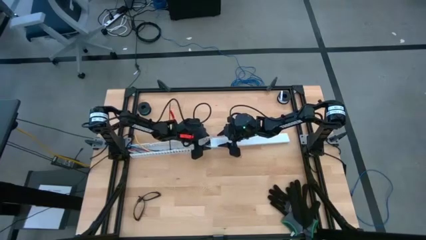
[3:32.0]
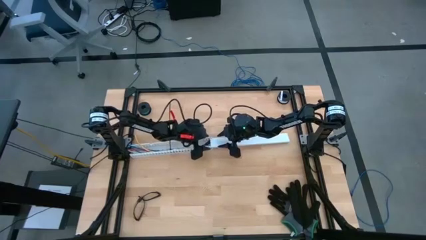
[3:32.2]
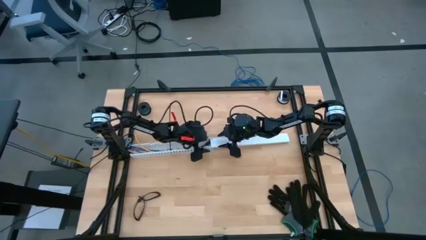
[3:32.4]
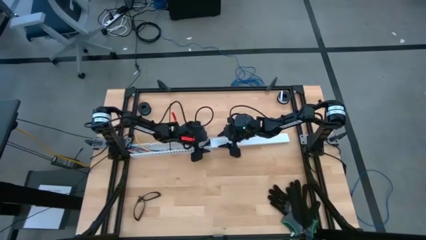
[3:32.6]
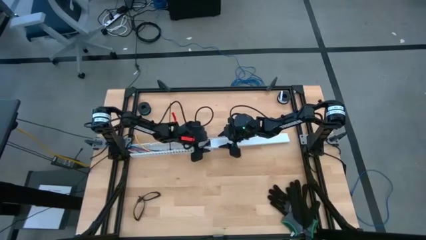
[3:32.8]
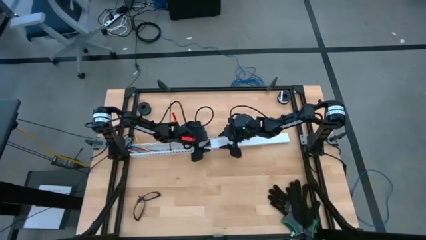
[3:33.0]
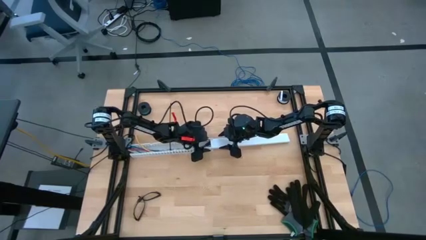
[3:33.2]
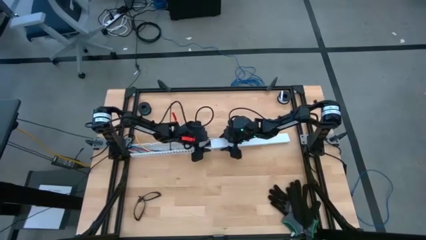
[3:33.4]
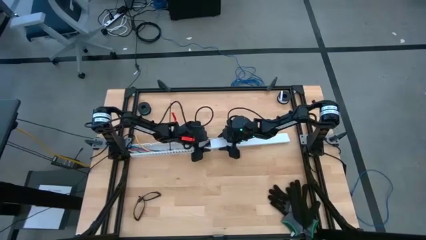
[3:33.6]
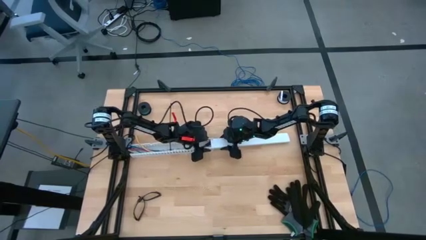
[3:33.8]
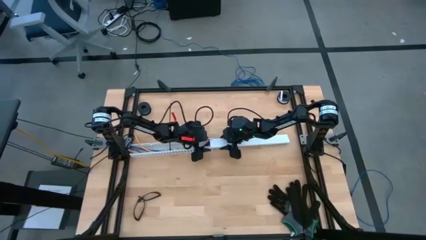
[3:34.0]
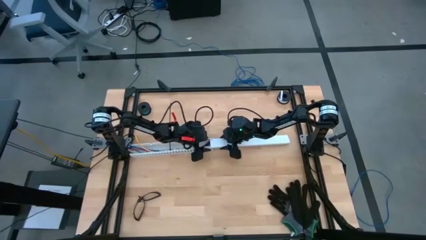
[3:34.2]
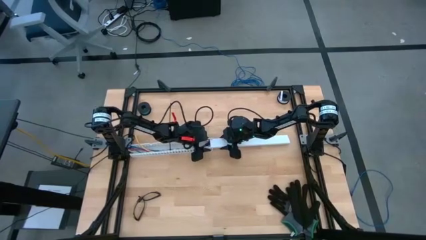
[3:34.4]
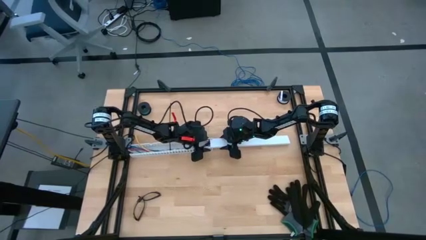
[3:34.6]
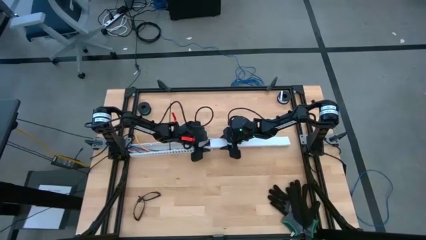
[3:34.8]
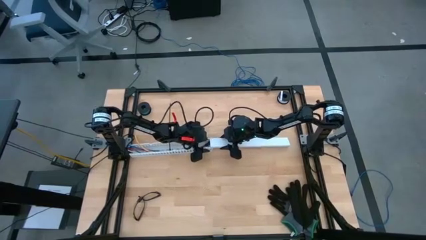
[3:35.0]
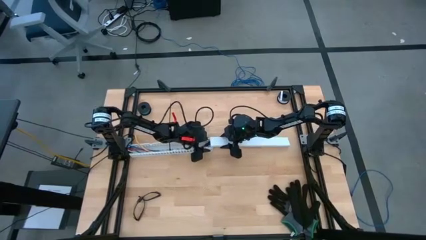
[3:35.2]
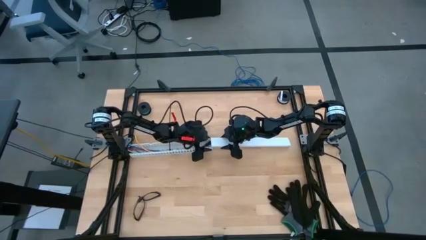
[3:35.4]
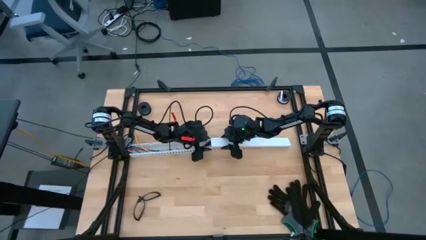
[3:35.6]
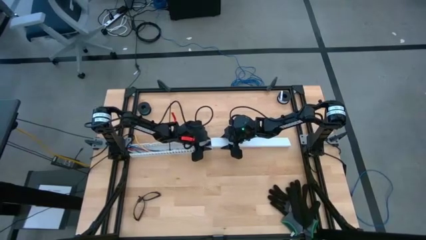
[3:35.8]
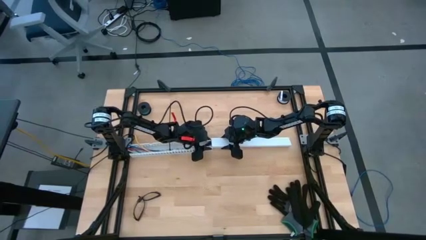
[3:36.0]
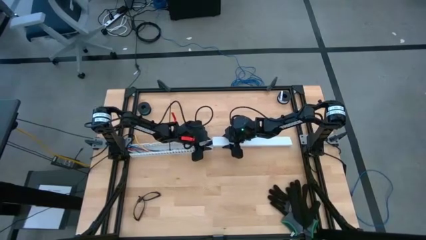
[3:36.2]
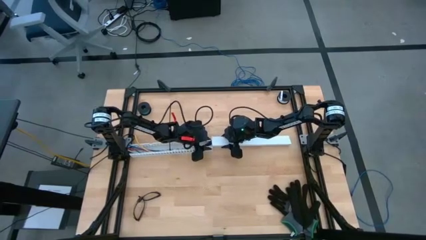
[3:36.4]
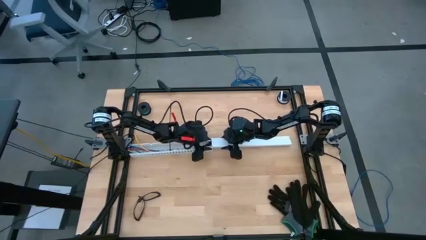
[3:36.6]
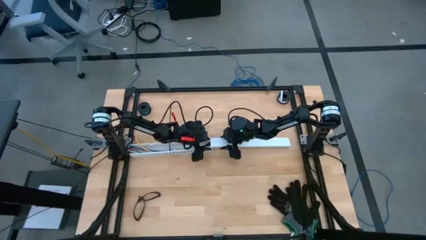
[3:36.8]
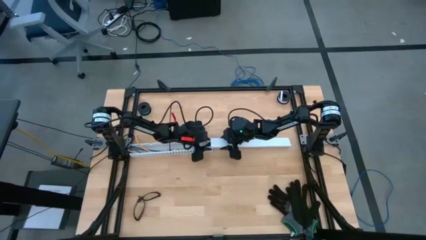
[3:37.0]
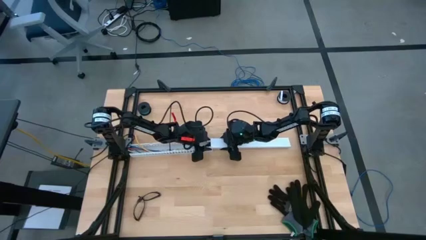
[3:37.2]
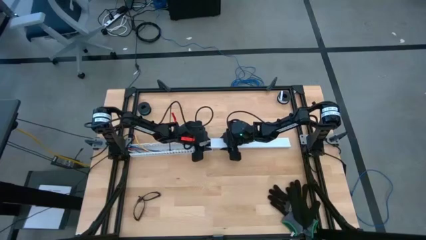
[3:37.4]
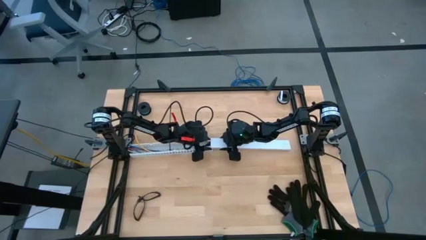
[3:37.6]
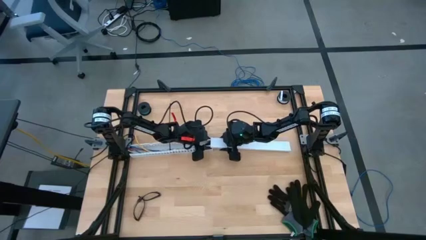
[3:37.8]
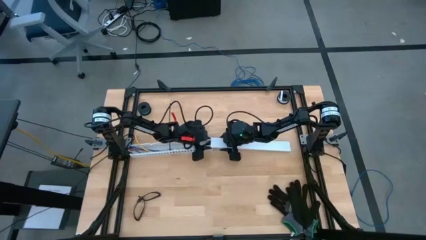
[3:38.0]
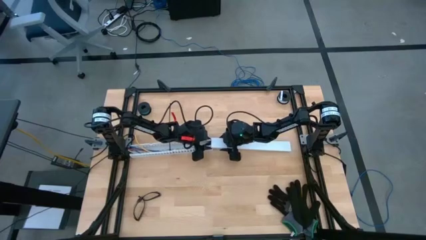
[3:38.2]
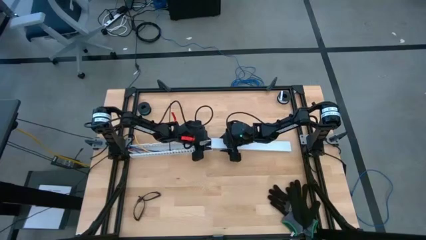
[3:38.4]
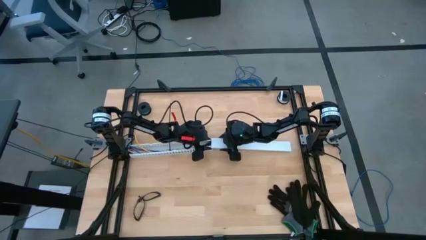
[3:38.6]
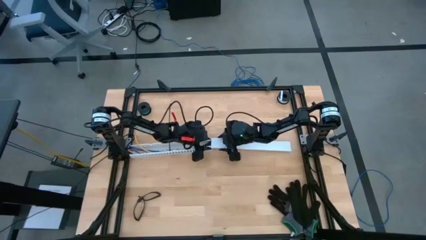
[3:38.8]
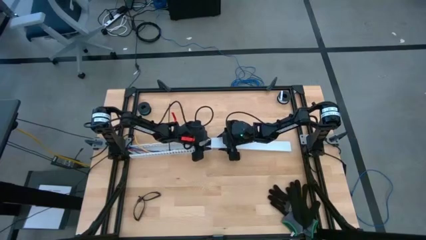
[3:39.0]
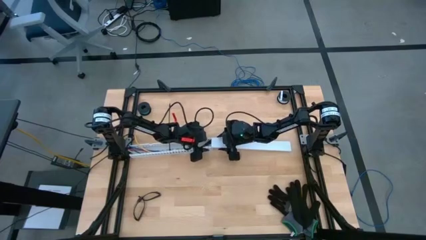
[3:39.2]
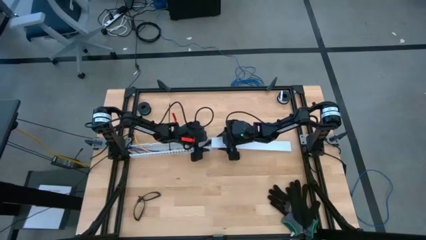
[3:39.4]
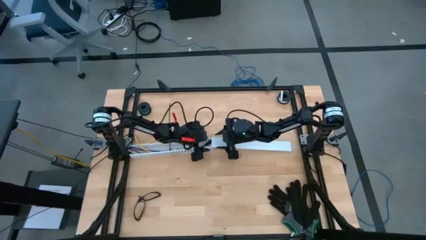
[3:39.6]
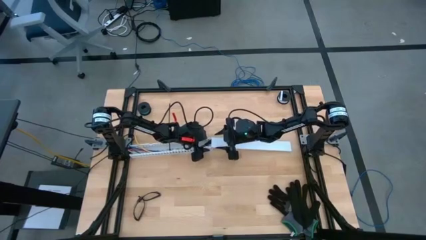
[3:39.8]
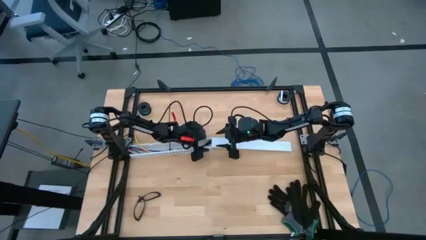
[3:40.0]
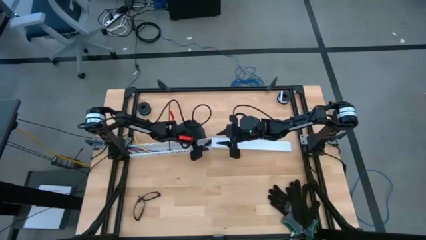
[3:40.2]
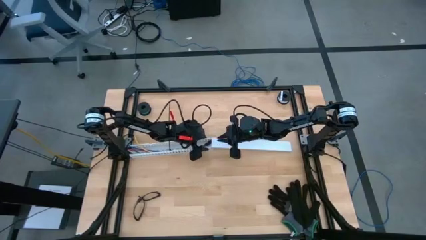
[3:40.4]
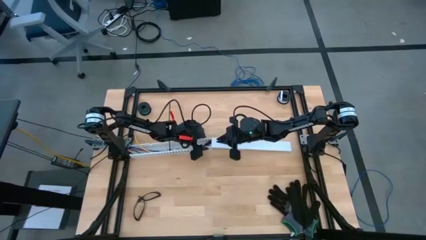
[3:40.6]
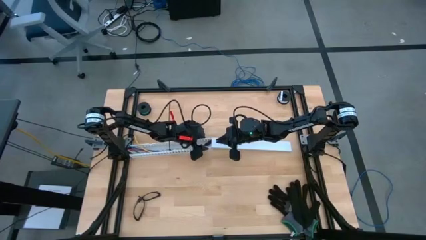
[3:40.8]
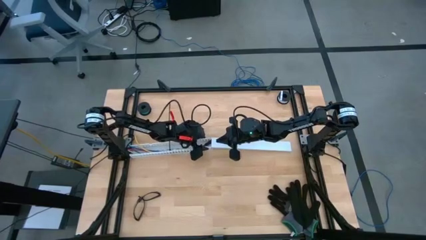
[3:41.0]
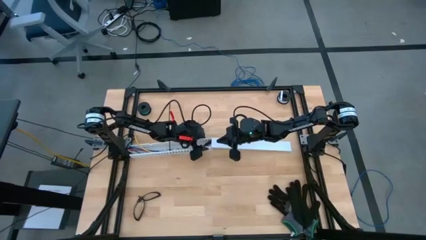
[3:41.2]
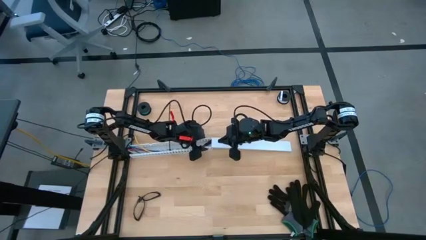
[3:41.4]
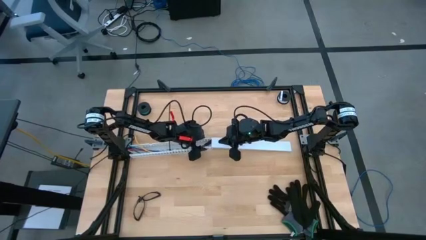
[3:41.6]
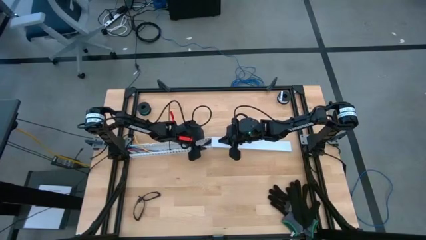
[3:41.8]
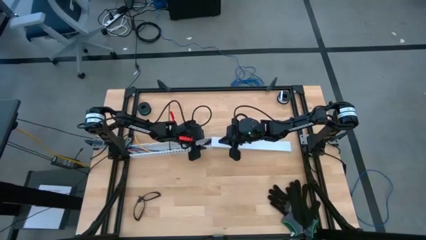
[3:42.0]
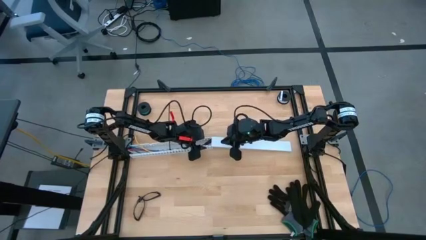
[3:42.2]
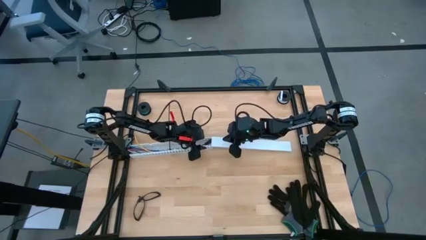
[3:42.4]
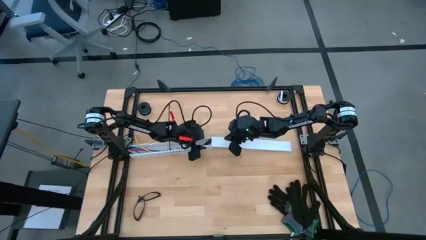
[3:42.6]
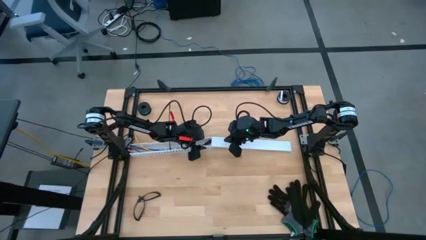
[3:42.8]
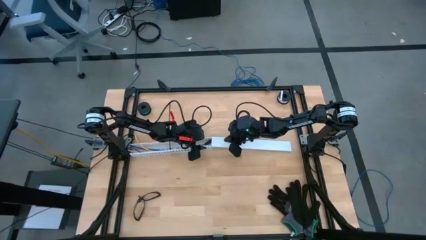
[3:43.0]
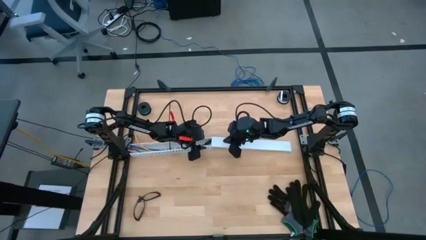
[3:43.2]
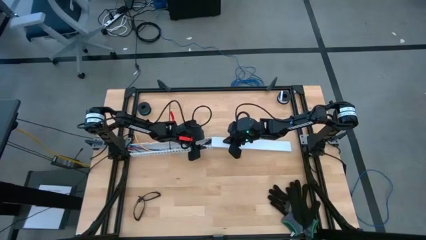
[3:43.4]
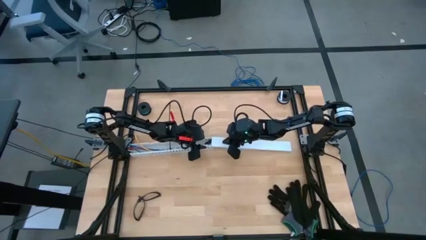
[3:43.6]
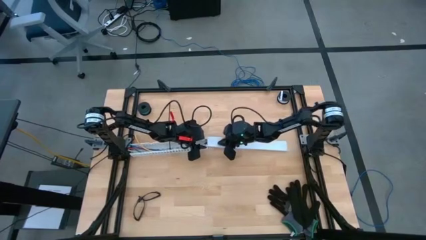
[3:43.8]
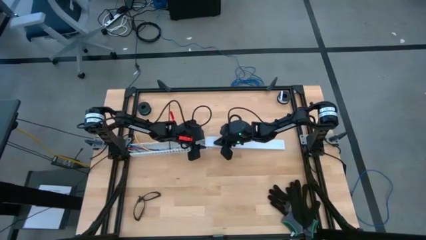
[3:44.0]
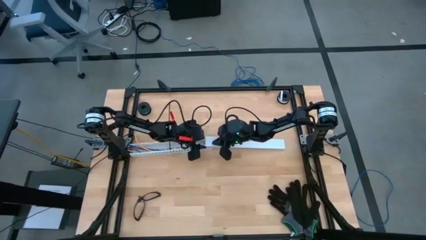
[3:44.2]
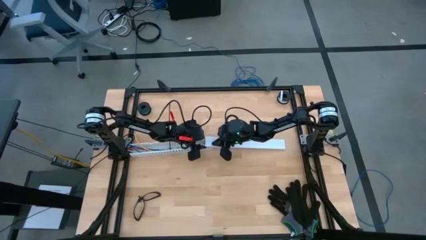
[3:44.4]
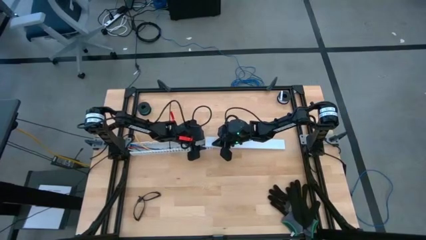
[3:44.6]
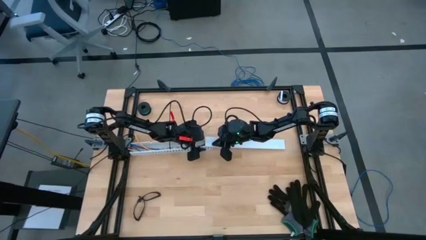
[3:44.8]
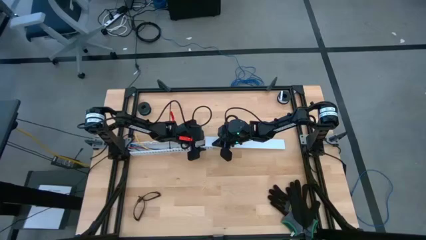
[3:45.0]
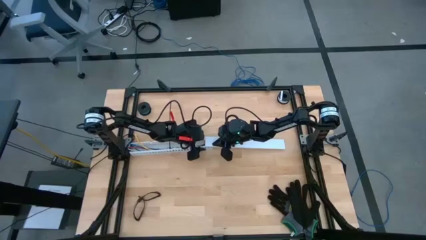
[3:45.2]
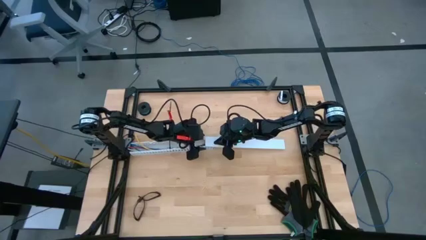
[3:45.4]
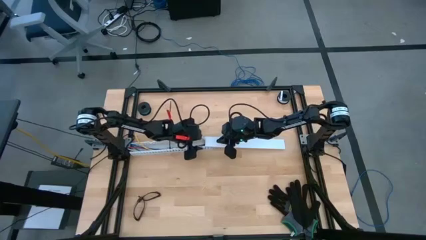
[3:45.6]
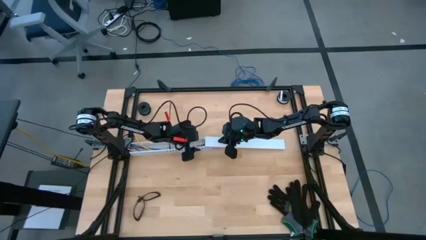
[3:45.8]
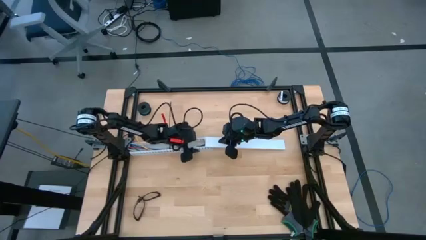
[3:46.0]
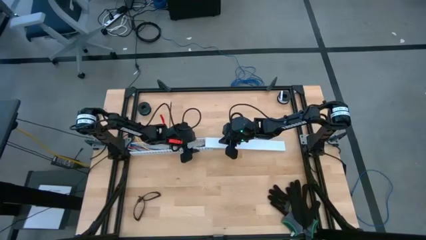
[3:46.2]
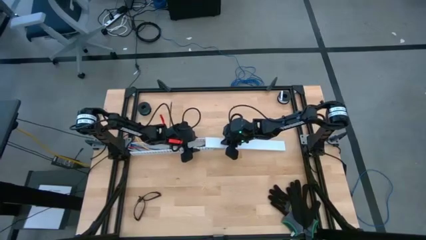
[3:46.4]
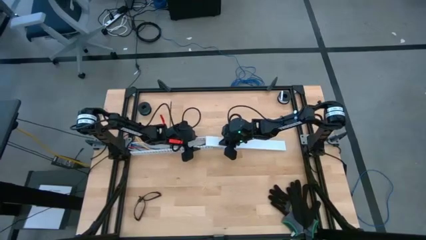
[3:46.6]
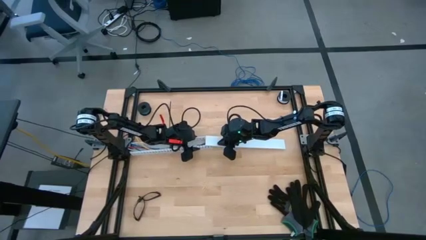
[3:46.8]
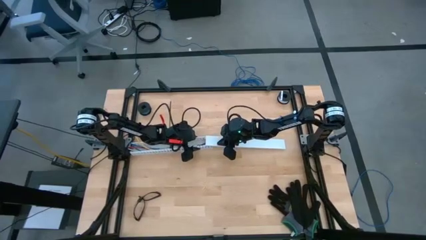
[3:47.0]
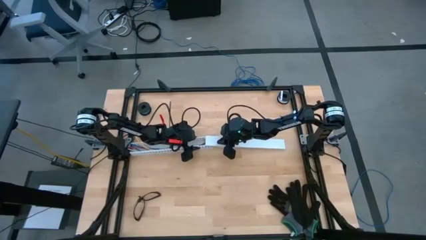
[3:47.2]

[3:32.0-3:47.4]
Task: Ziptie cables
Close the white cable duct using the cover

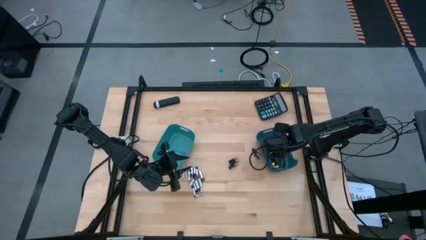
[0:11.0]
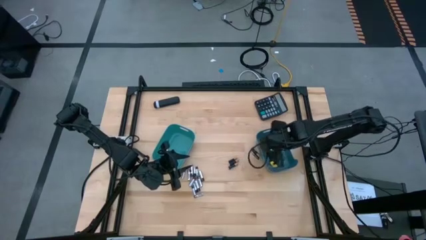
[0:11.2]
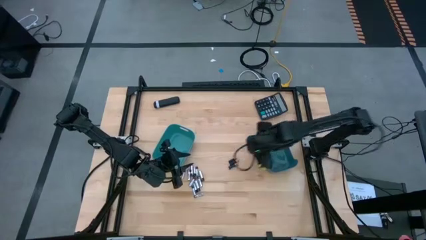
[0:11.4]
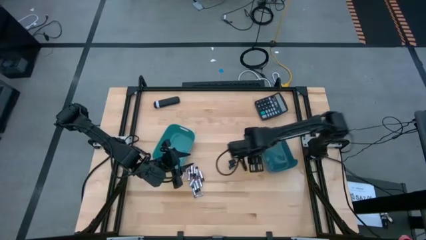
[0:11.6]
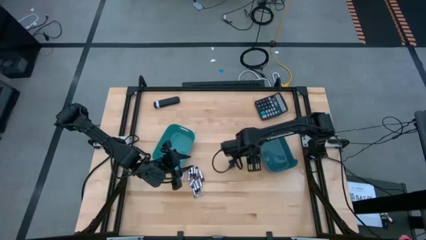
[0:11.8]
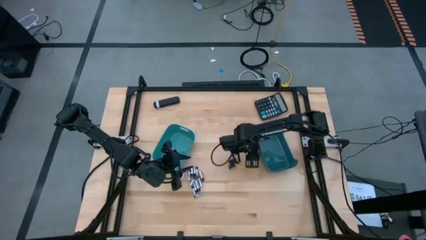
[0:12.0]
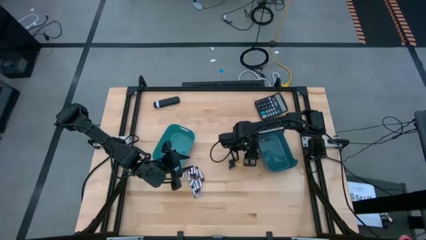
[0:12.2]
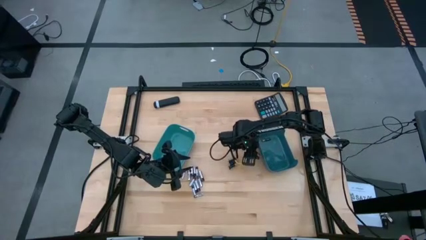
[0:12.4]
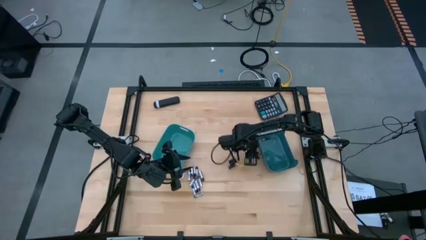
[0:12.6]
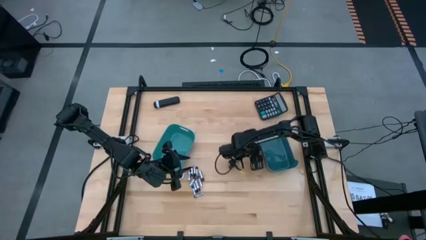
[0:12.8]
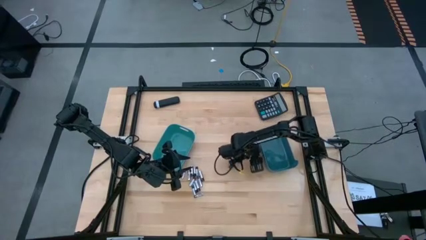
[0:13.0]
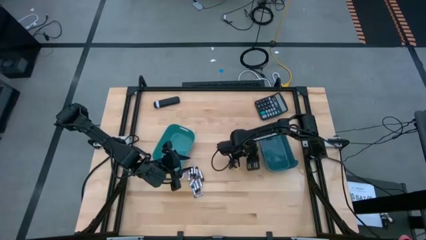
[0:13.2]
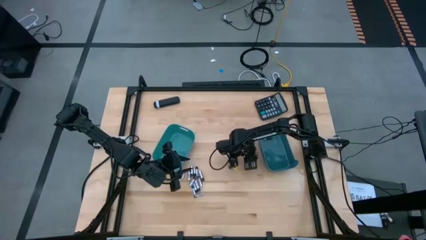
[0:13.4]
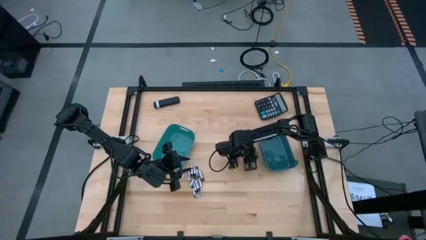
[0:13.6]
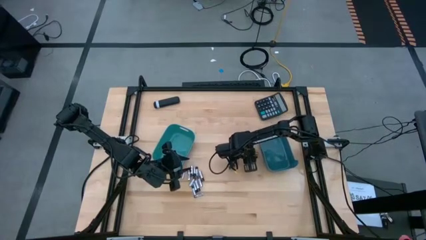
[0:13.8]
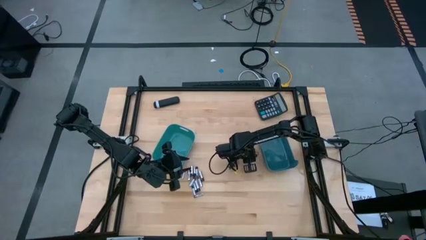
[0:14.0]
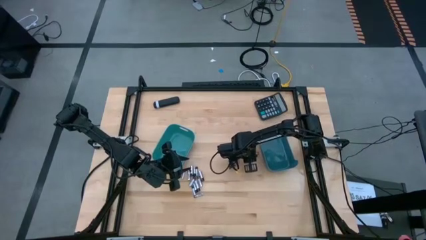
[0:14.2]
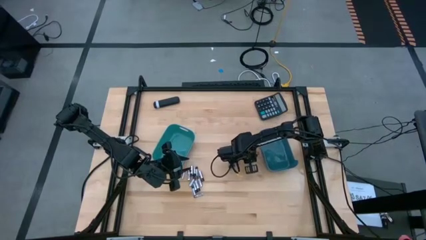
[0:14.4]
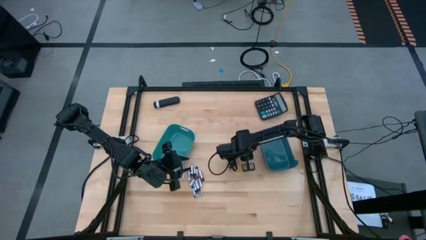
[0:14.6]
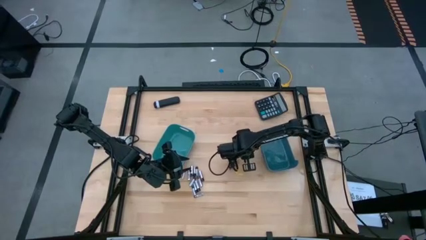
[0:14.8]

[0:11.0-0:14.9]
Task: Sort batteries
Put the black battery into the blue bin
